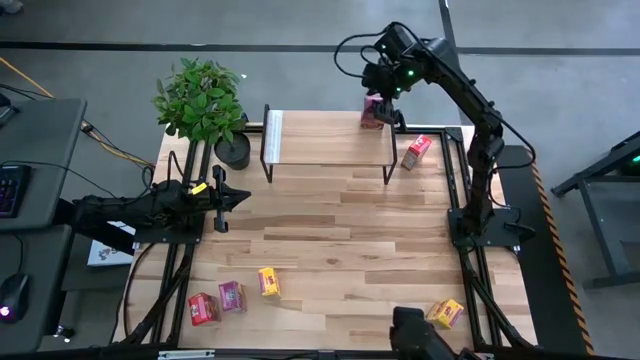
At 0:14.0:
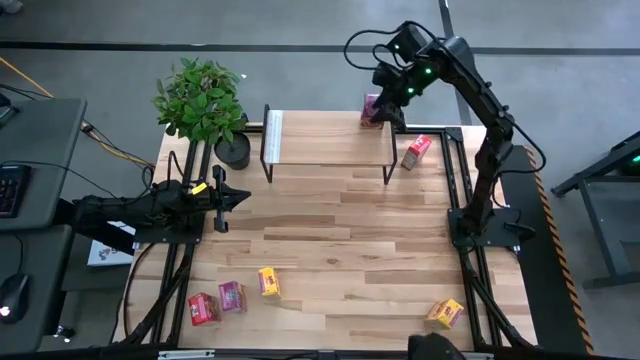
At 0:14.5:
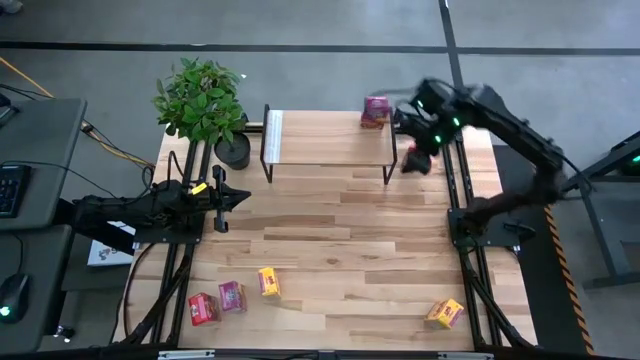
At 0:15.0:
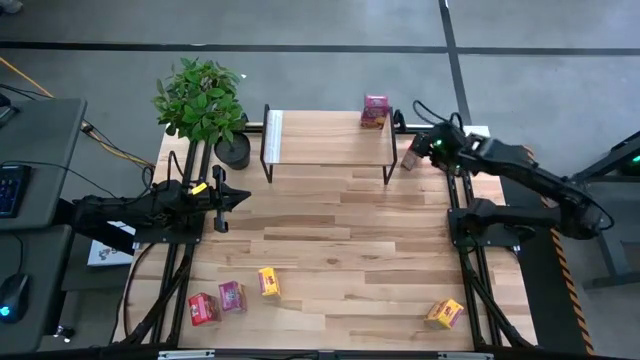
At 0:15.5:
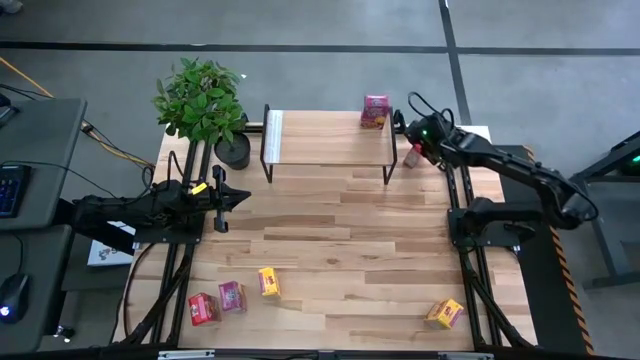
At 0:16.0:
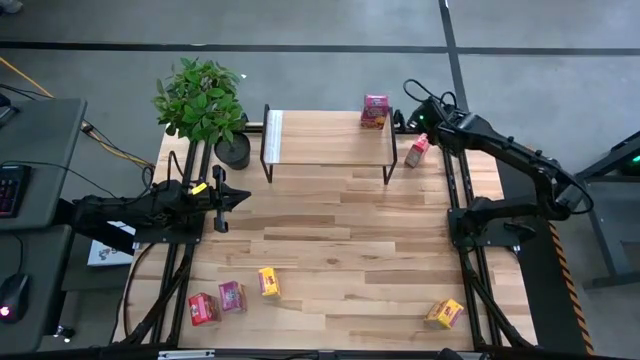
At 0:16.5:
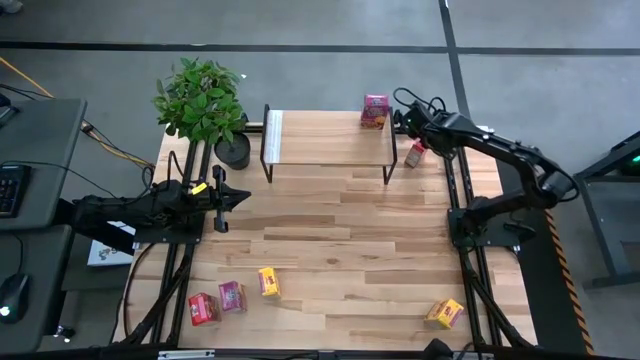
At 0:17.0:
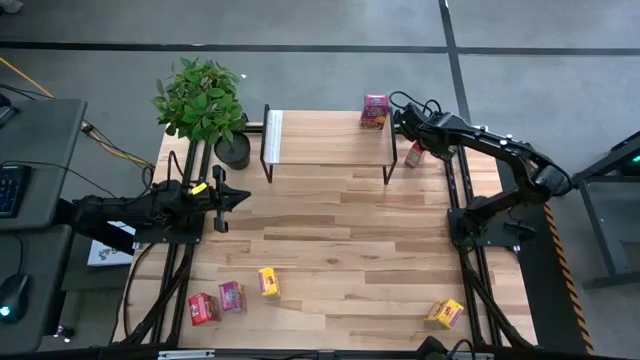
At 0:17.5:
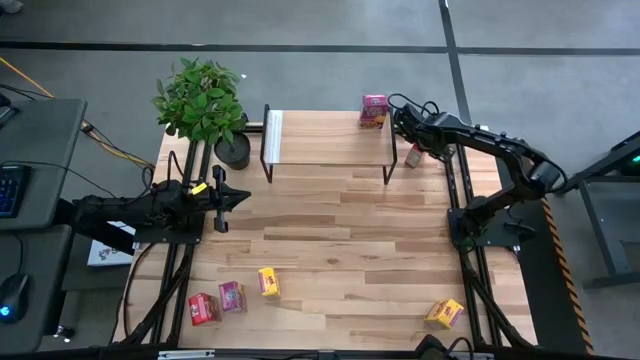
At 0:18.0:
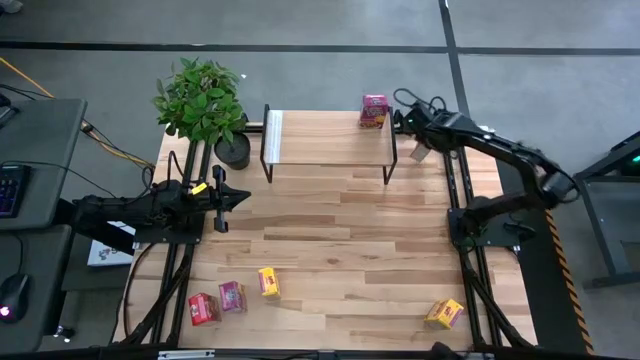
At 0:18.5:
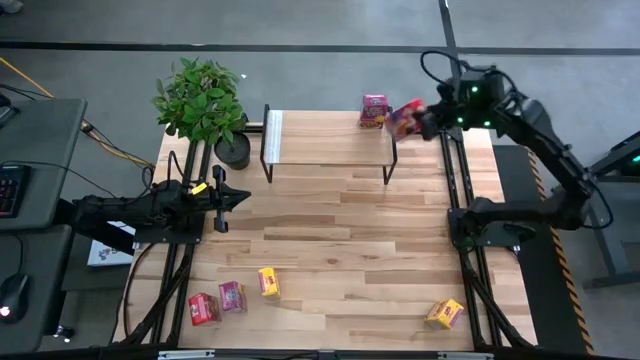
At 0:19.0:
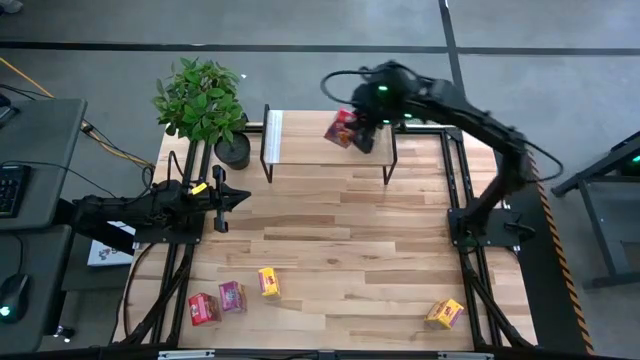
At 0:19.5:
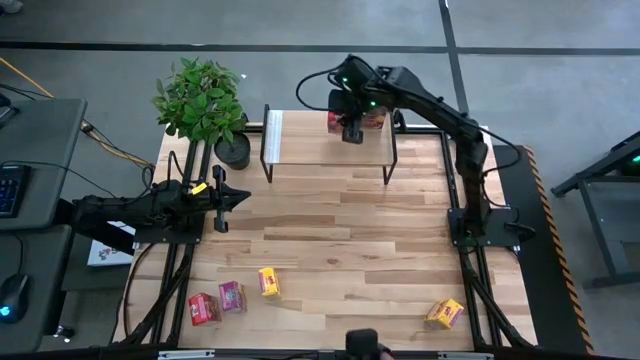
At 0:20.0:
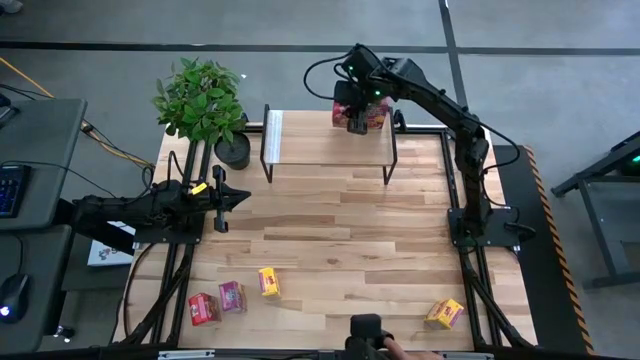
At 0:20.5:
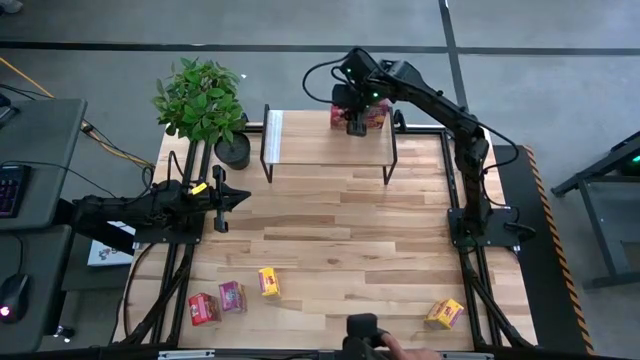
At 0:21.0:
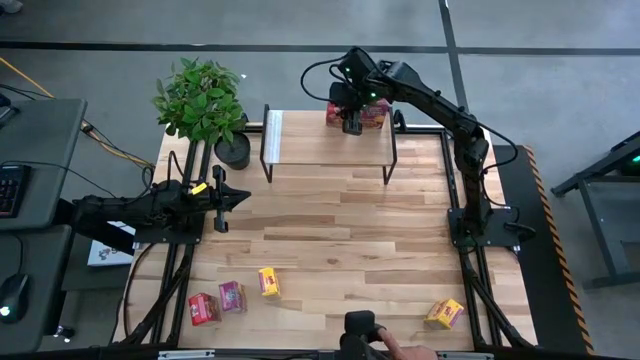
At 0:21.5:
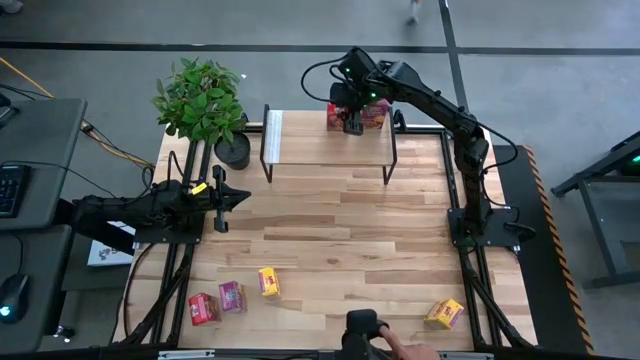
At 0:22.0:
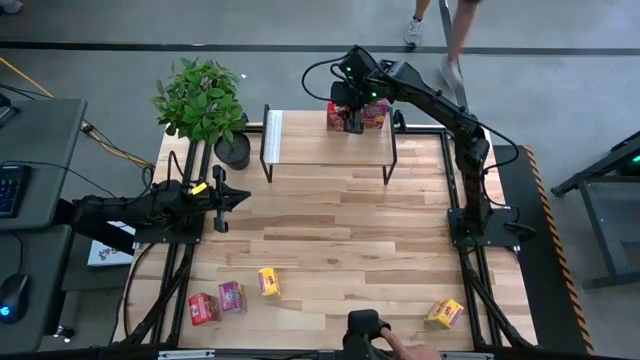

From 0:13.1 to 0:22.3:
Task: Stack cereal on shelf
Put the top red cereal box on the shelf

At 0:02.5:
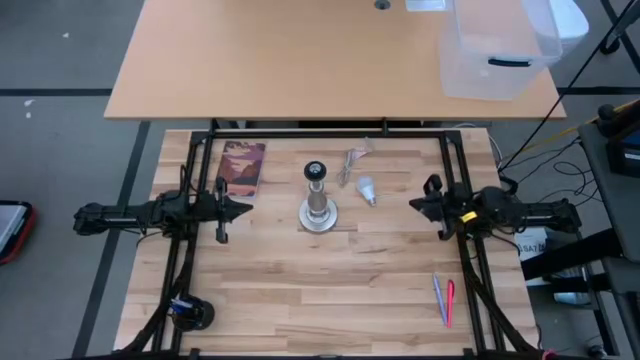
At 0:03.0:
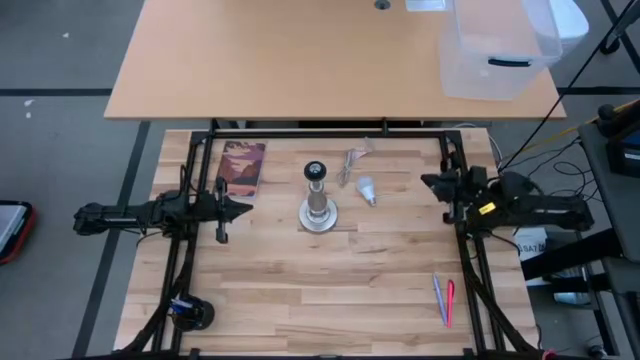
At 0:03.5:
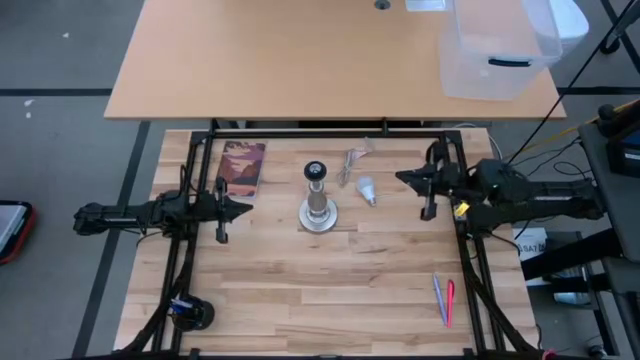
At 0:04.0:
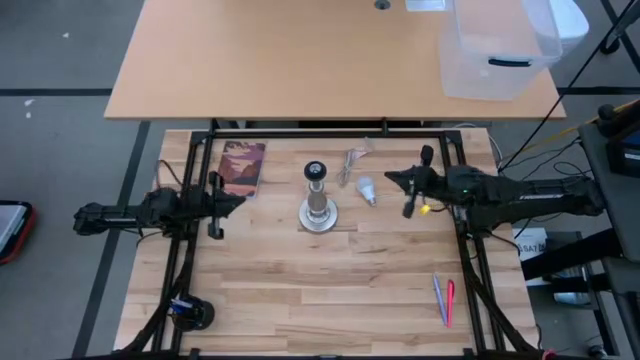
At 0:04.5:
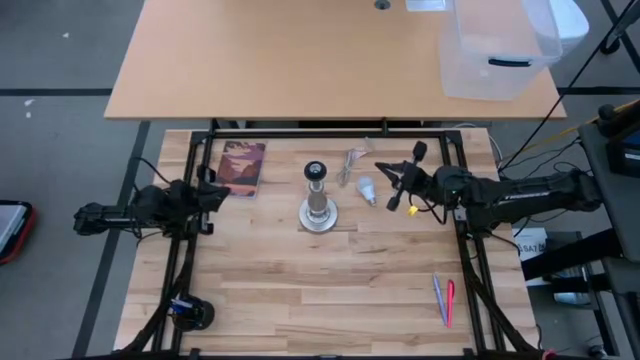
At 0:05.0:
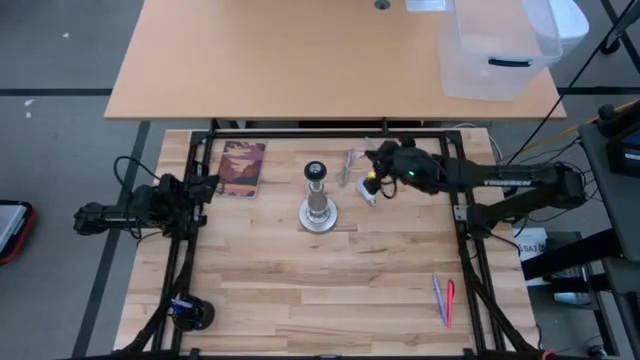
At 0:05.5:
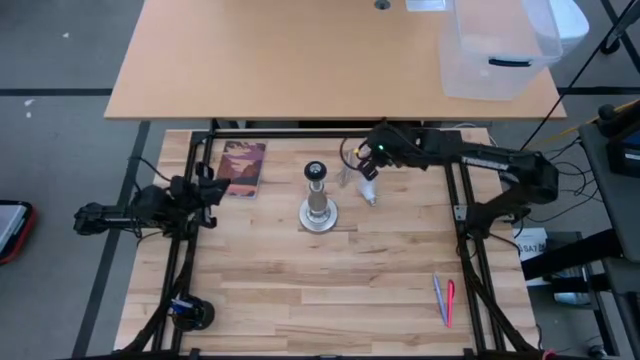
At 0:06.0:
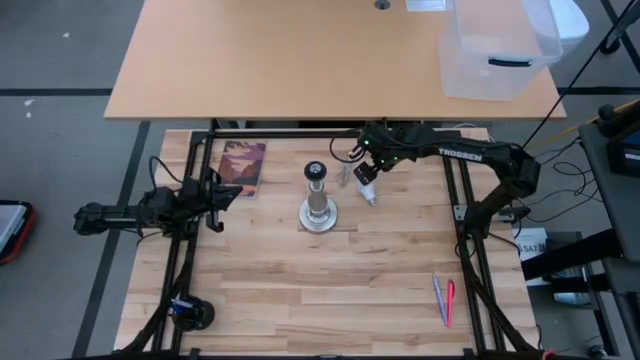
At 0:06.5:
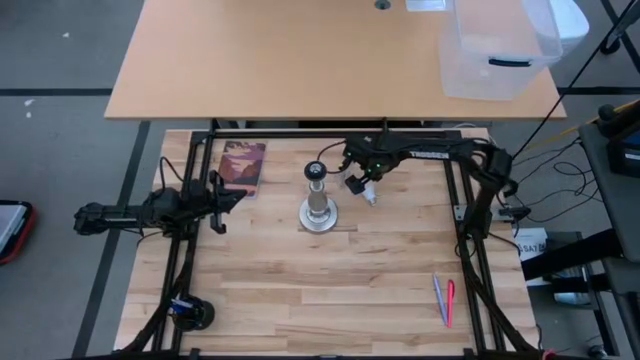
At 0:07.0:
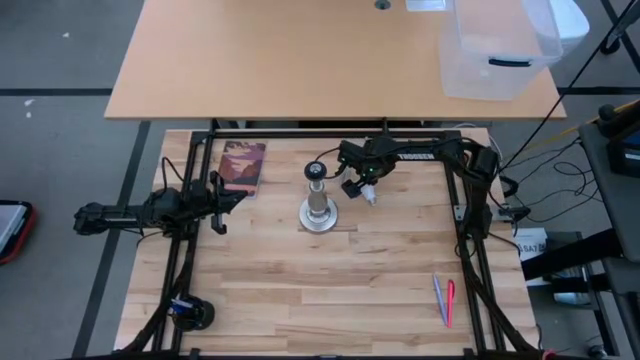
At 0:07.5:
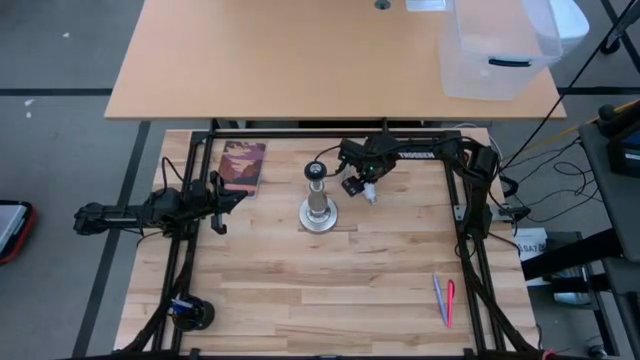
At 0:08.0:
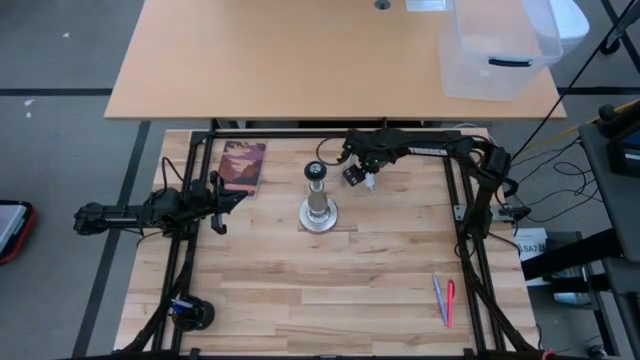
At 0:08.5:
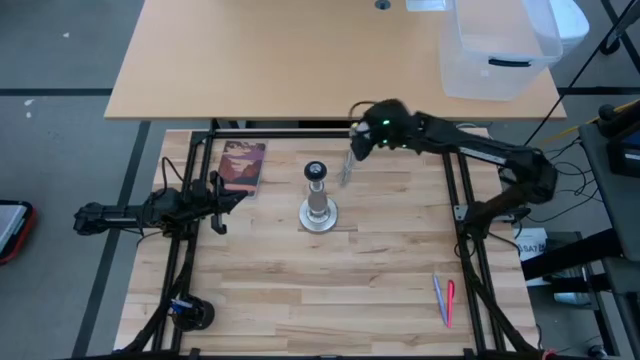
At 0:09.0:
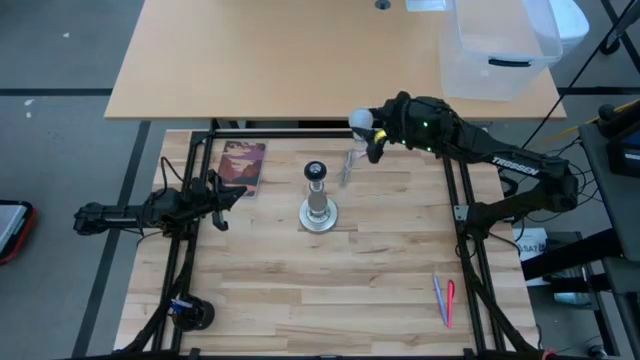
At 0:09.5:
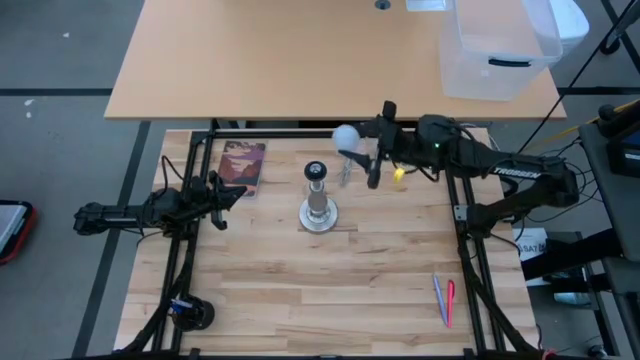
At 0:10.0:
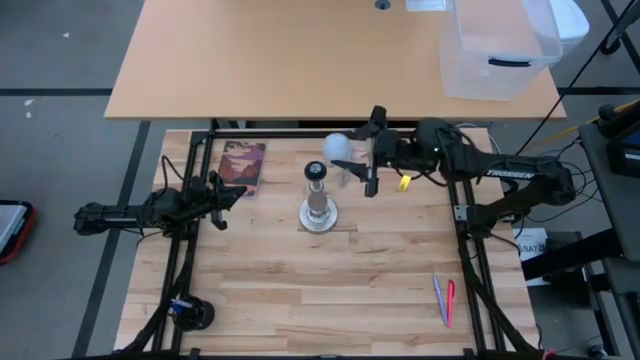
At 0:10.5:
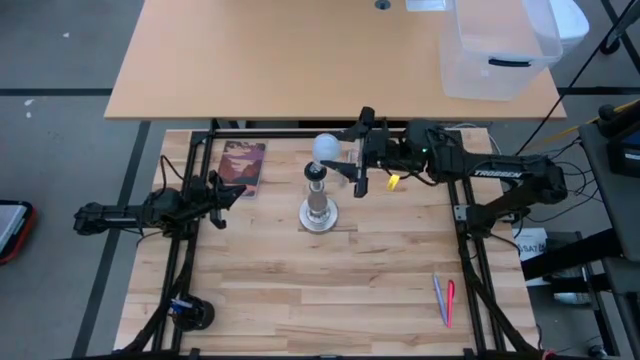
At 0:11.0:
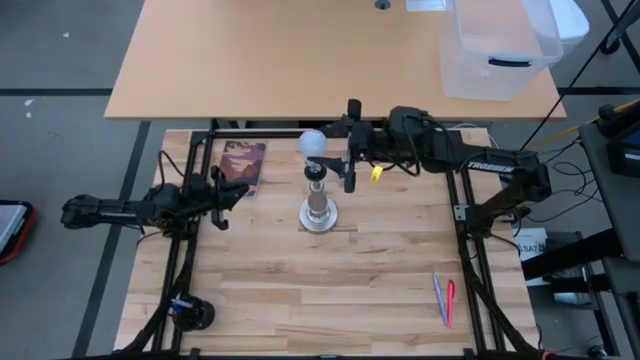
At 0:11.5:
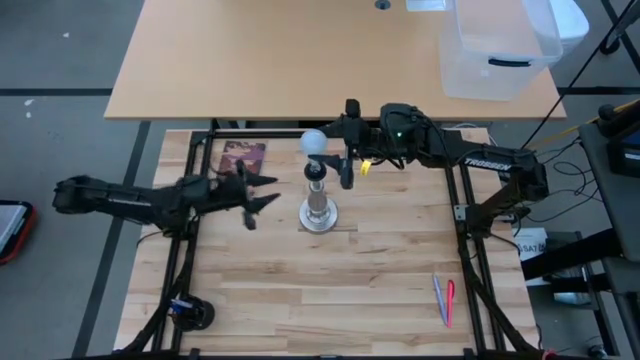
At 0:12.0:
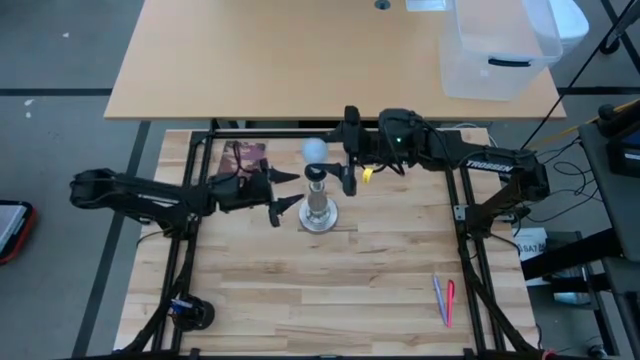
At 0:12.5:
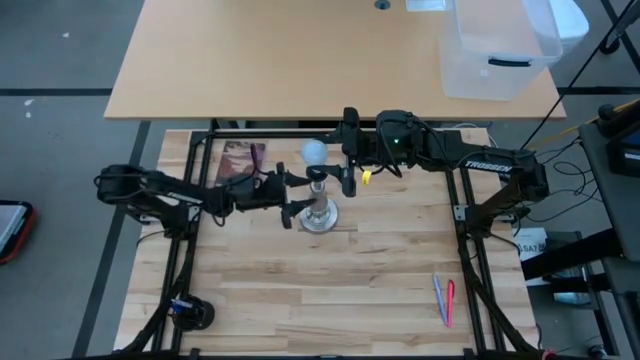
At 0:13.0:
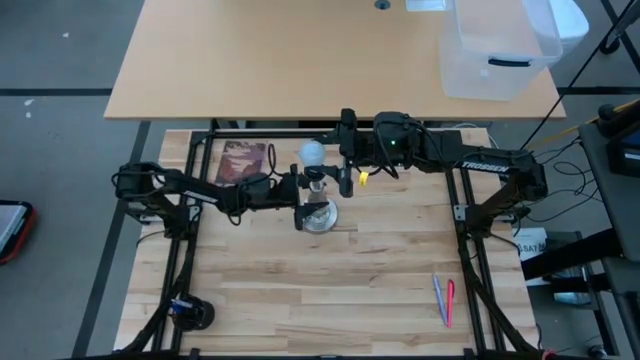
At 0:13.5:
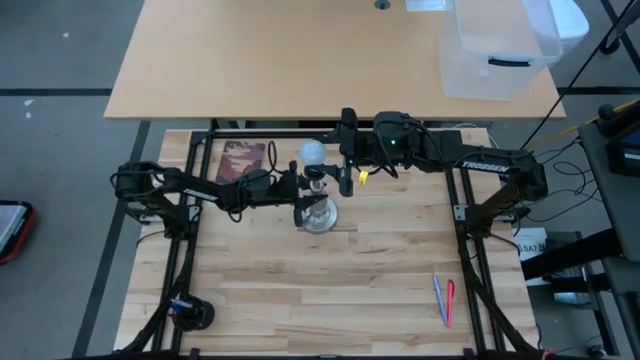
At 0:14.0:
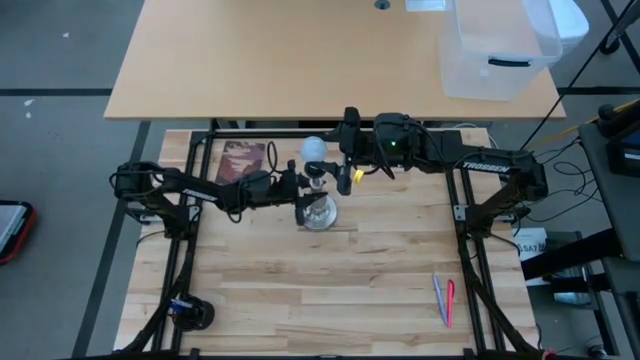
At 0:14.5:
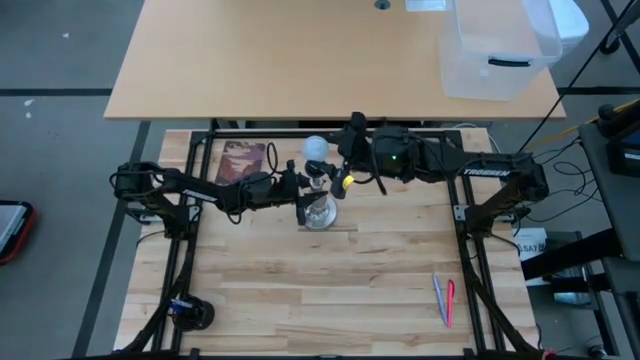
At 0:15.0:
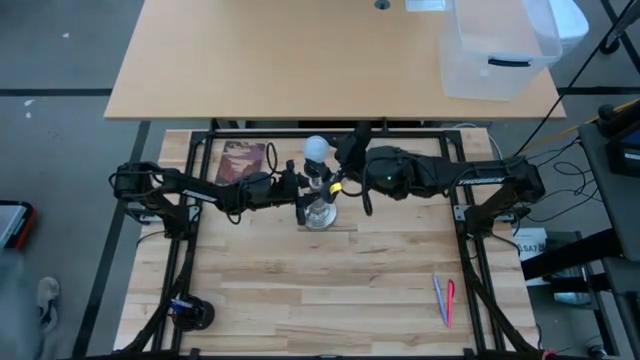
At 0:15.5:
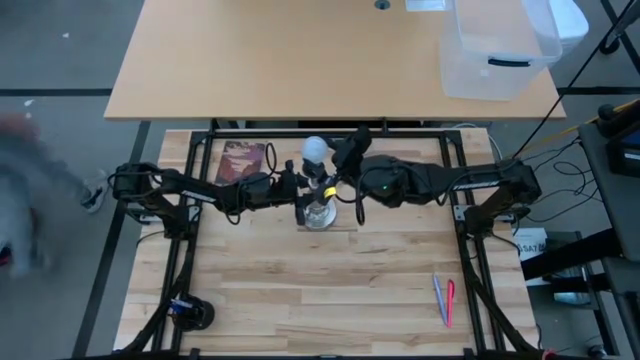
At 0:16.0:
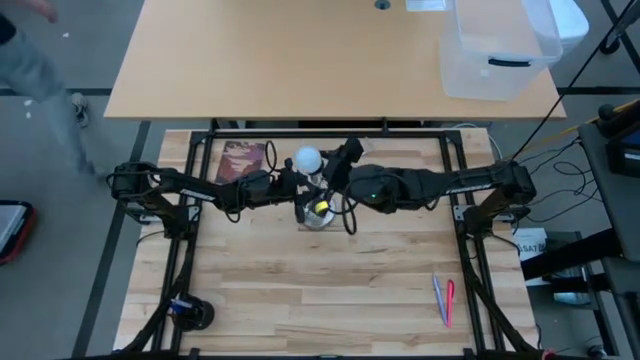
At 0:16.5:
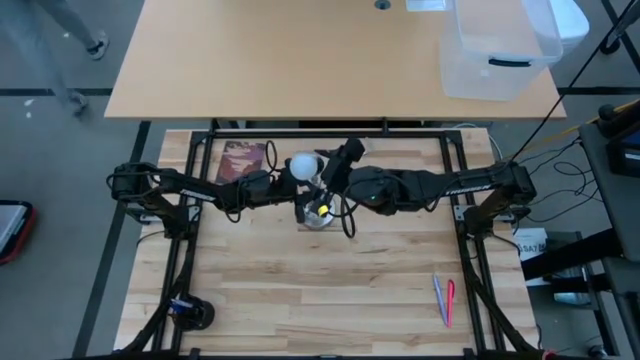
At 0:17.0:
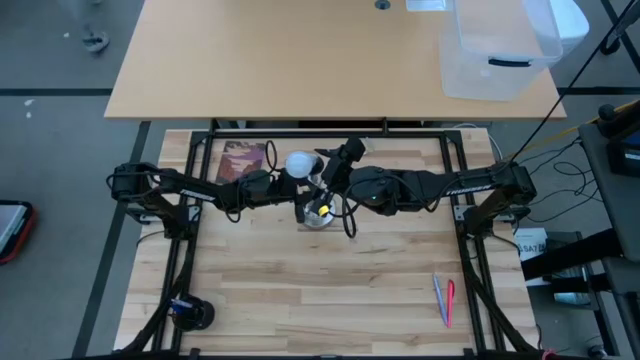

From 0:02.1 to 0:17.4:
Task: Screw lightbulb
Insert the white lightbulb into the silver lamp
